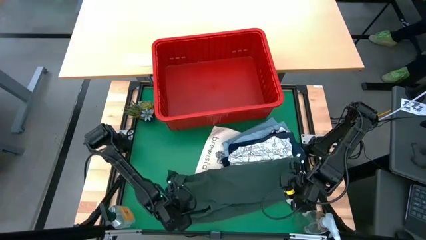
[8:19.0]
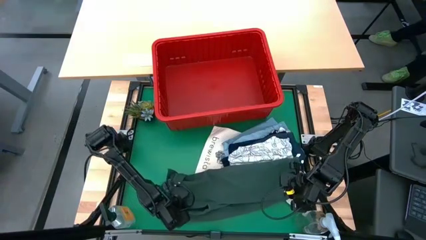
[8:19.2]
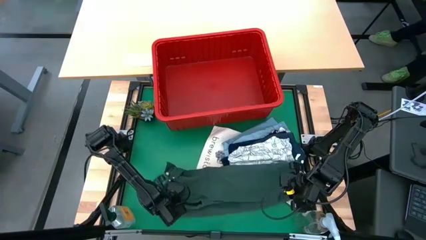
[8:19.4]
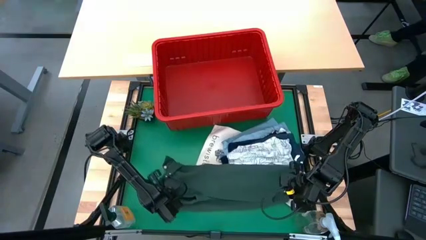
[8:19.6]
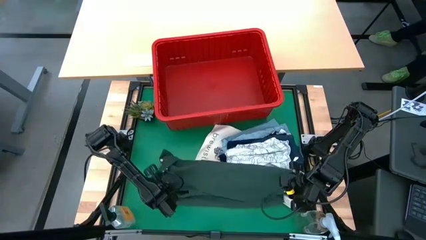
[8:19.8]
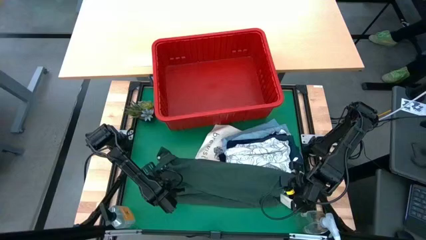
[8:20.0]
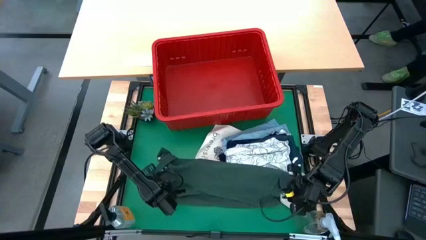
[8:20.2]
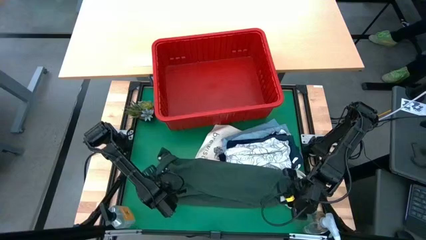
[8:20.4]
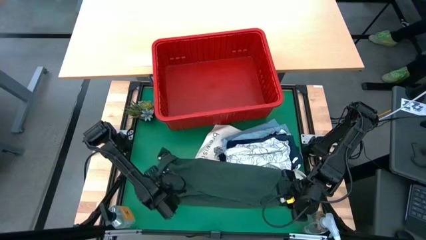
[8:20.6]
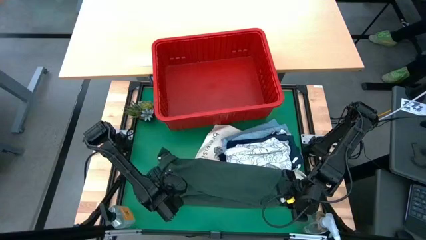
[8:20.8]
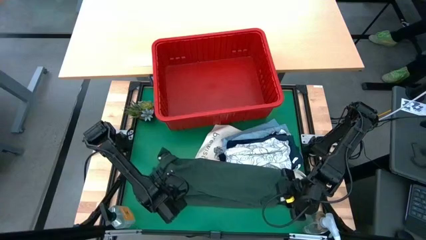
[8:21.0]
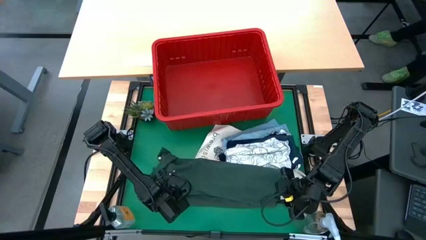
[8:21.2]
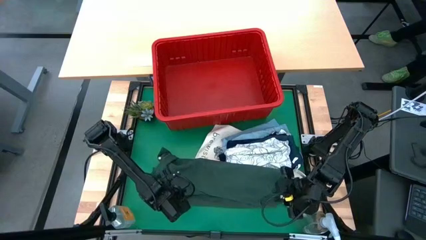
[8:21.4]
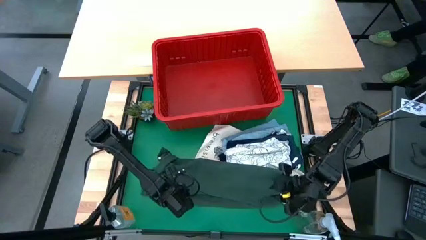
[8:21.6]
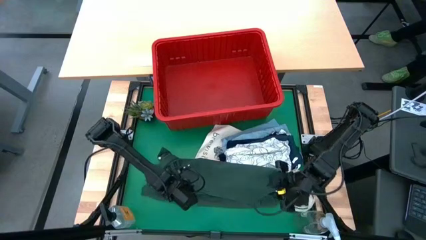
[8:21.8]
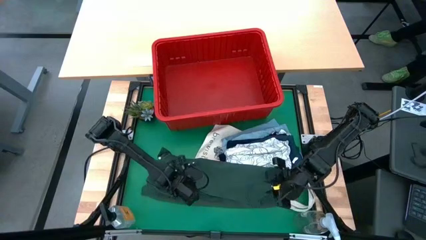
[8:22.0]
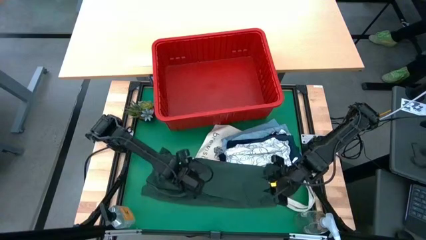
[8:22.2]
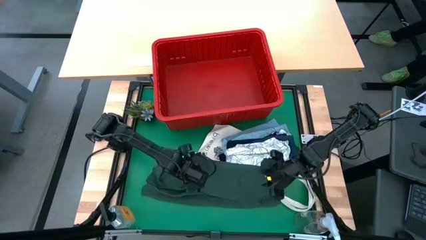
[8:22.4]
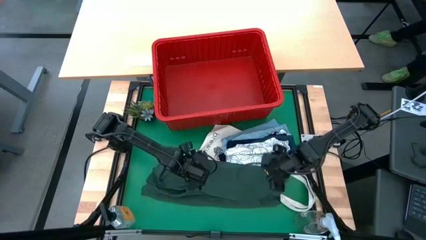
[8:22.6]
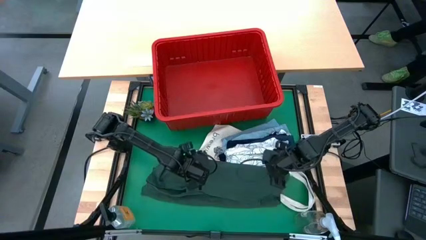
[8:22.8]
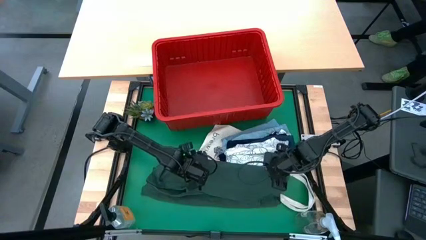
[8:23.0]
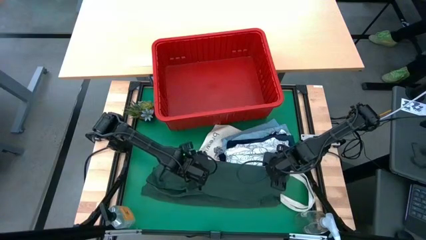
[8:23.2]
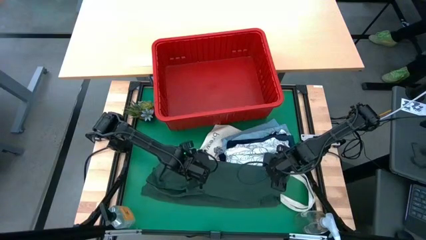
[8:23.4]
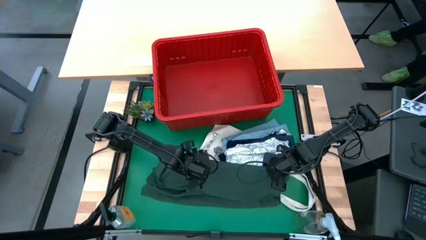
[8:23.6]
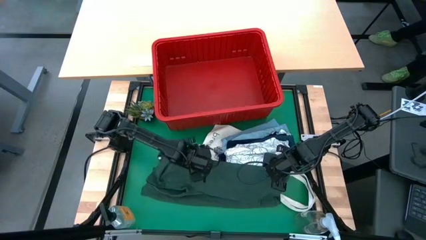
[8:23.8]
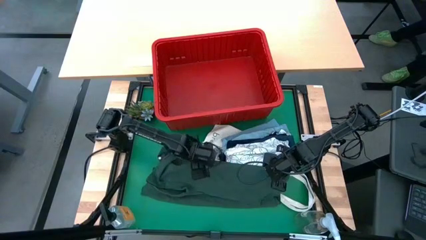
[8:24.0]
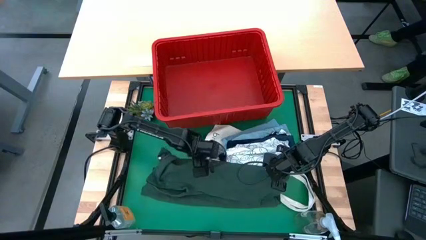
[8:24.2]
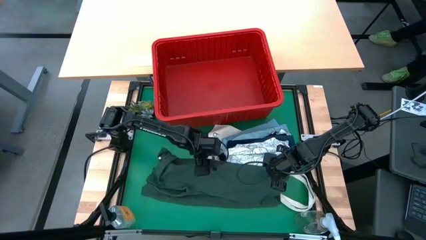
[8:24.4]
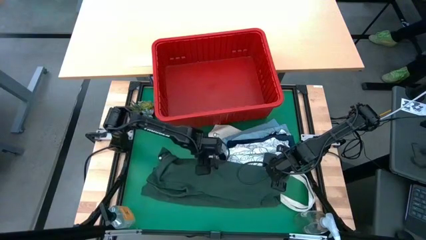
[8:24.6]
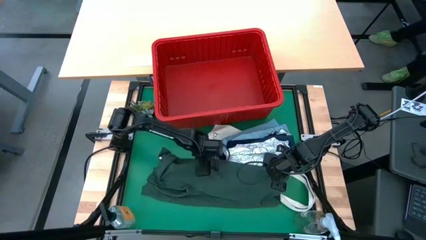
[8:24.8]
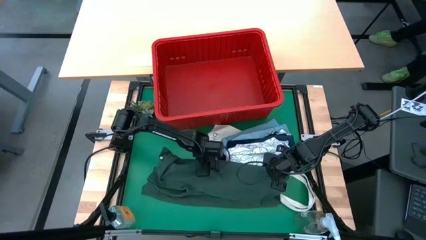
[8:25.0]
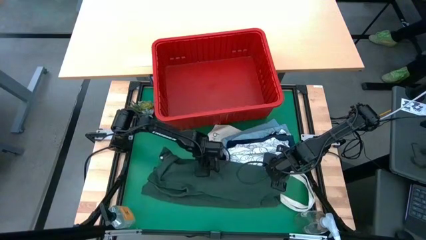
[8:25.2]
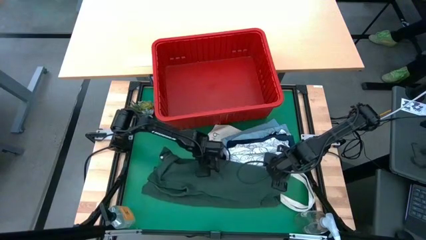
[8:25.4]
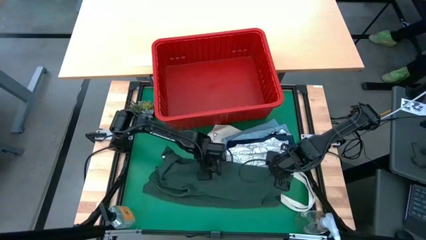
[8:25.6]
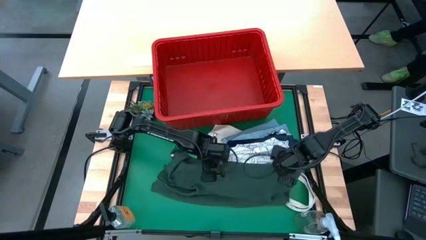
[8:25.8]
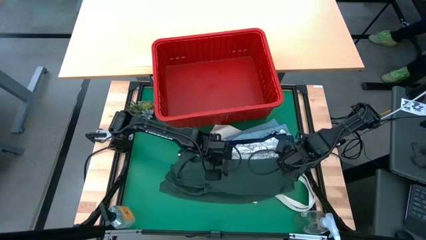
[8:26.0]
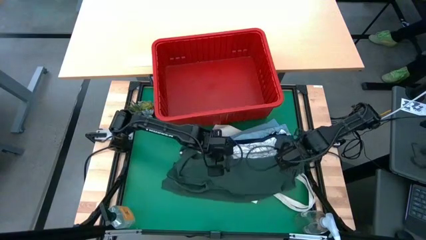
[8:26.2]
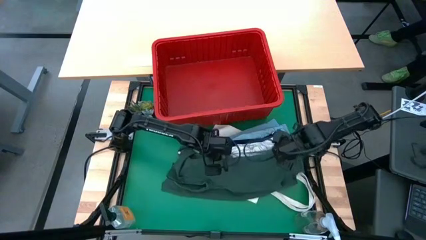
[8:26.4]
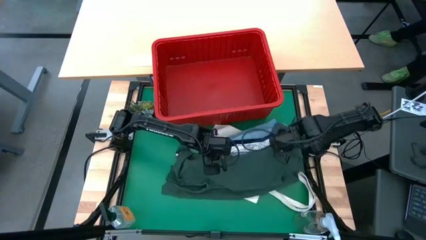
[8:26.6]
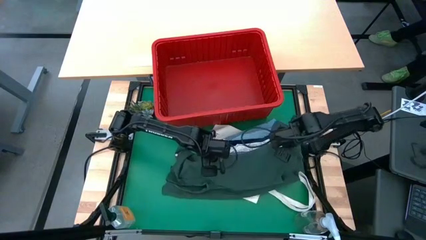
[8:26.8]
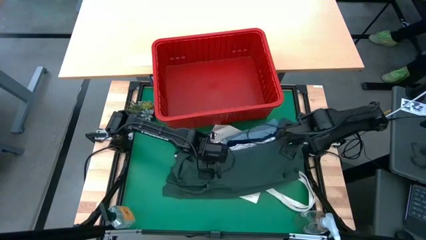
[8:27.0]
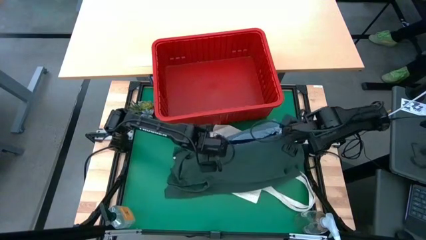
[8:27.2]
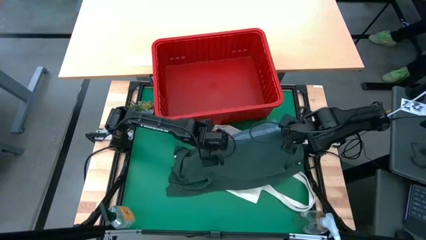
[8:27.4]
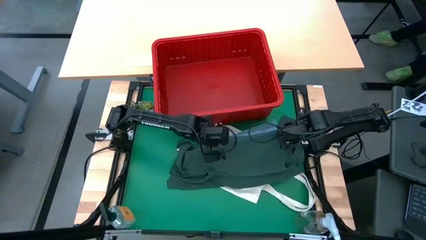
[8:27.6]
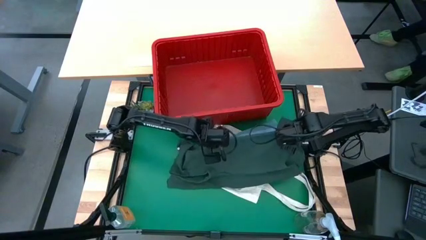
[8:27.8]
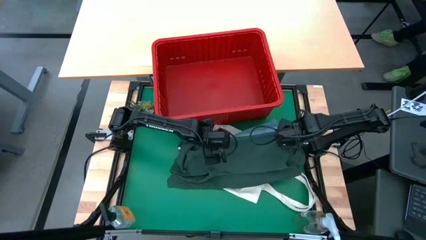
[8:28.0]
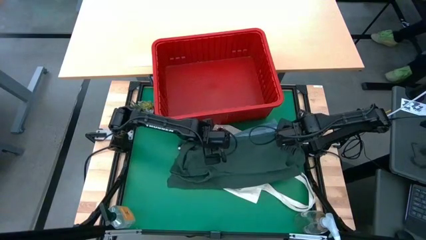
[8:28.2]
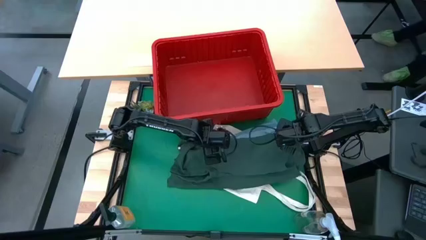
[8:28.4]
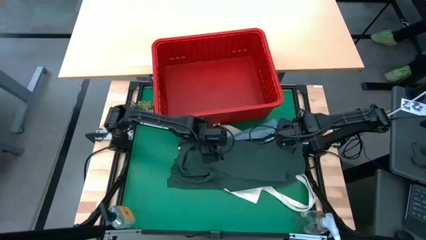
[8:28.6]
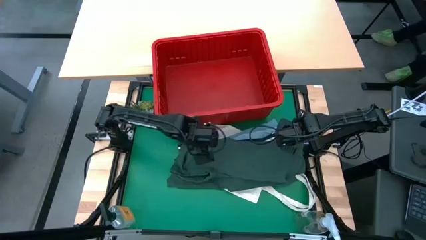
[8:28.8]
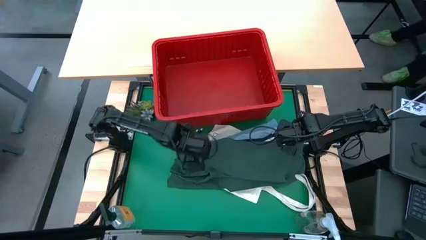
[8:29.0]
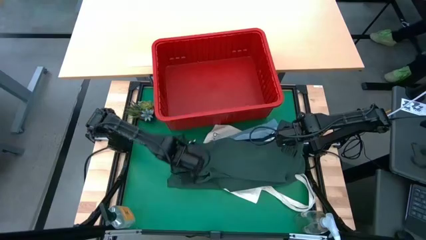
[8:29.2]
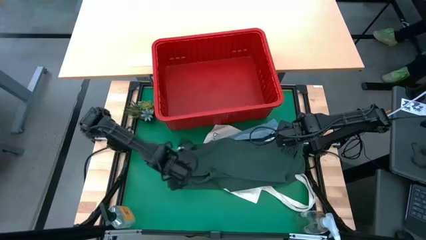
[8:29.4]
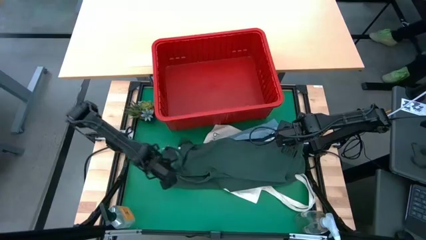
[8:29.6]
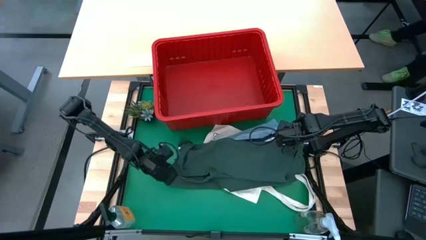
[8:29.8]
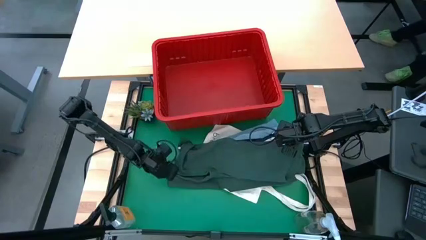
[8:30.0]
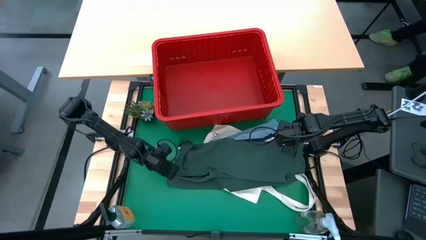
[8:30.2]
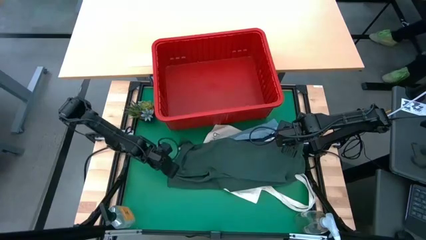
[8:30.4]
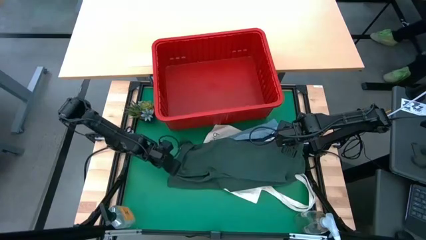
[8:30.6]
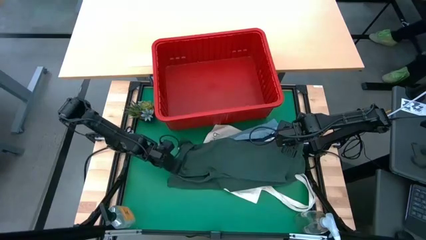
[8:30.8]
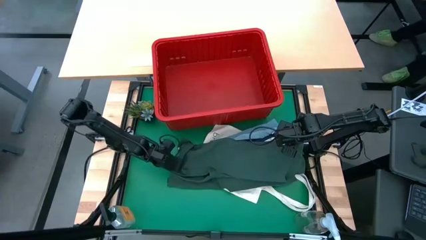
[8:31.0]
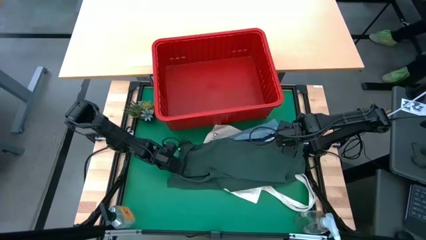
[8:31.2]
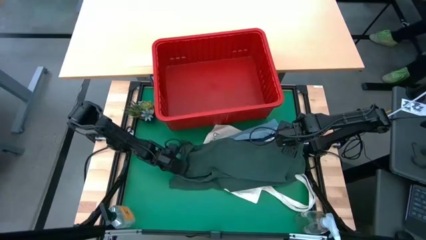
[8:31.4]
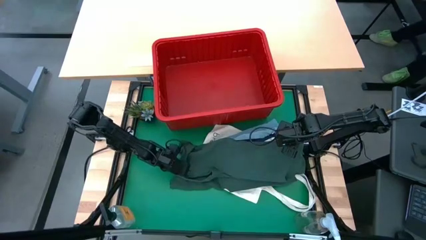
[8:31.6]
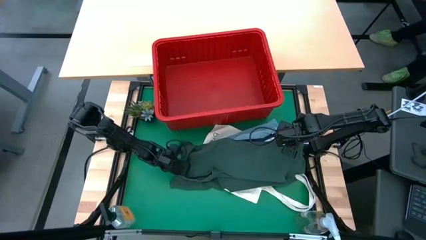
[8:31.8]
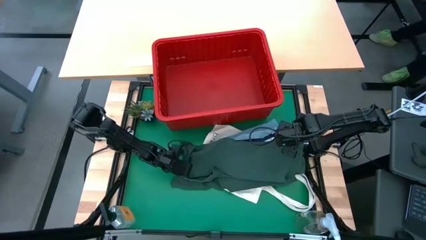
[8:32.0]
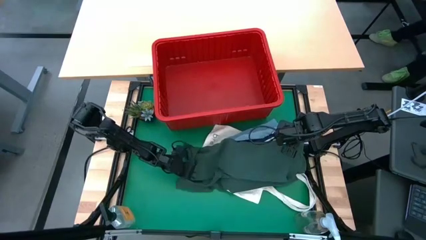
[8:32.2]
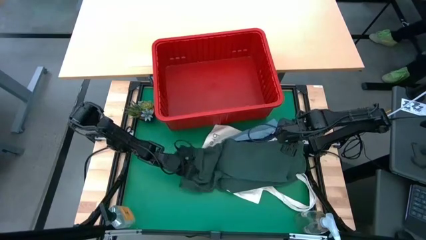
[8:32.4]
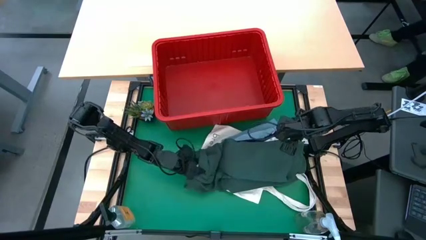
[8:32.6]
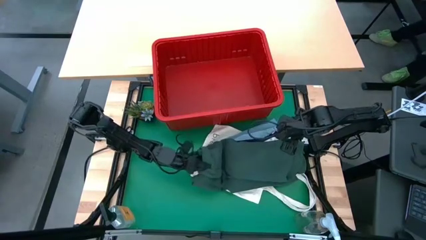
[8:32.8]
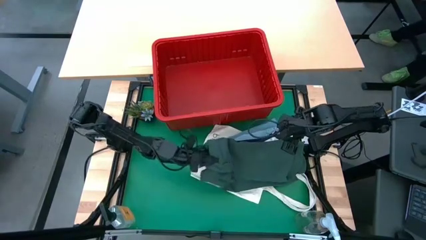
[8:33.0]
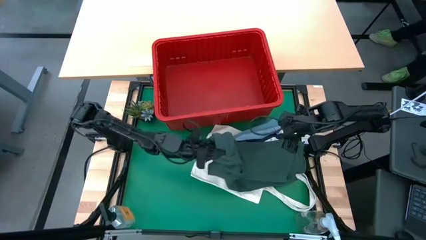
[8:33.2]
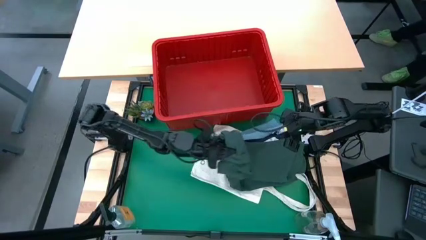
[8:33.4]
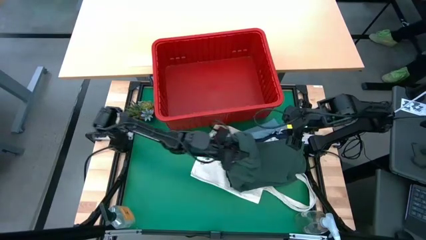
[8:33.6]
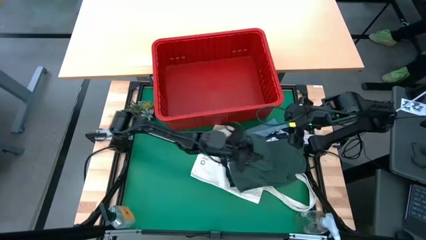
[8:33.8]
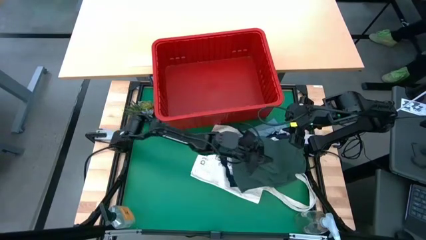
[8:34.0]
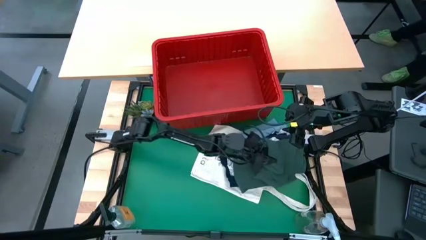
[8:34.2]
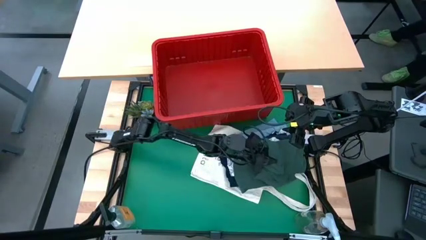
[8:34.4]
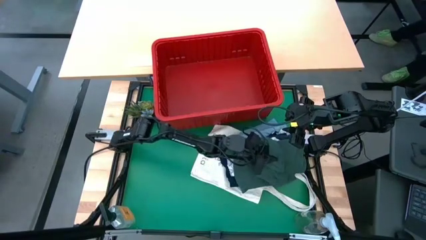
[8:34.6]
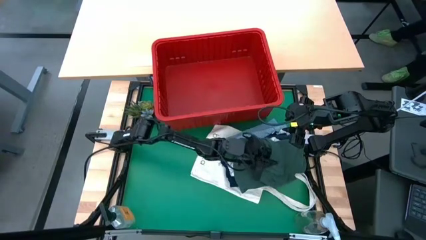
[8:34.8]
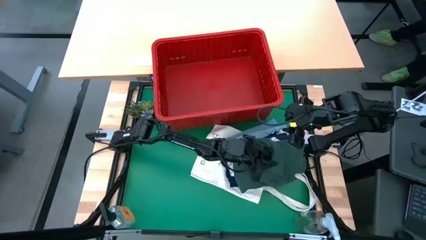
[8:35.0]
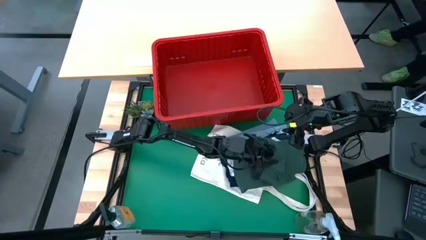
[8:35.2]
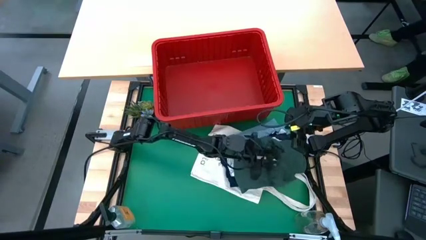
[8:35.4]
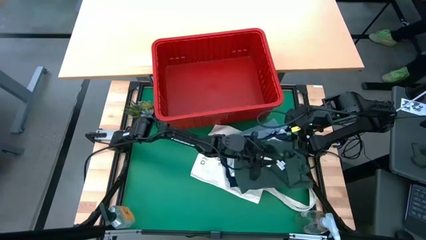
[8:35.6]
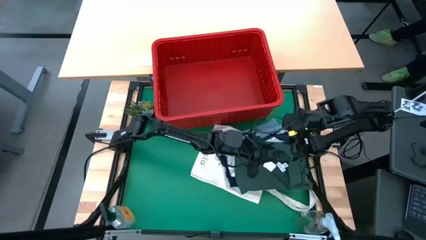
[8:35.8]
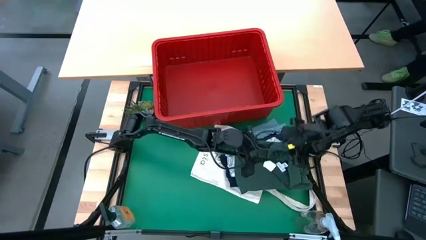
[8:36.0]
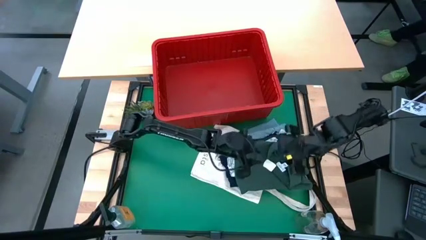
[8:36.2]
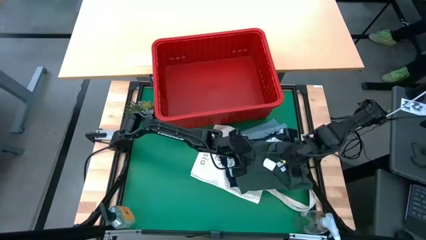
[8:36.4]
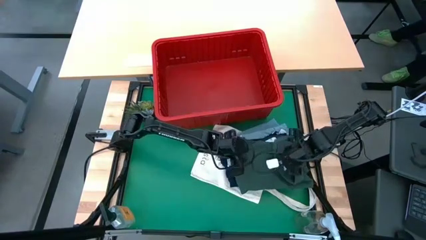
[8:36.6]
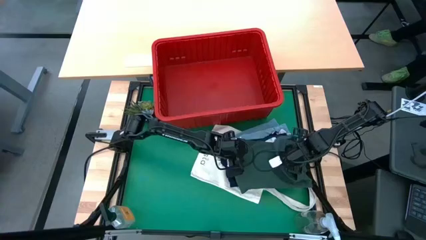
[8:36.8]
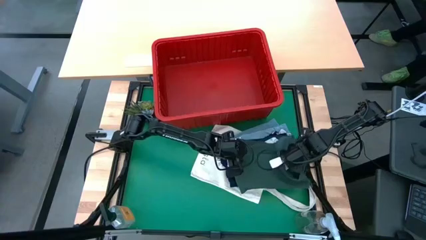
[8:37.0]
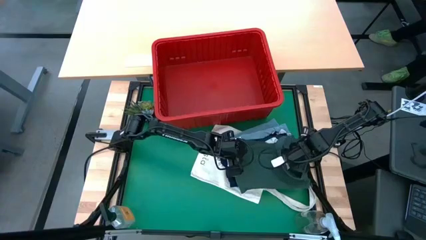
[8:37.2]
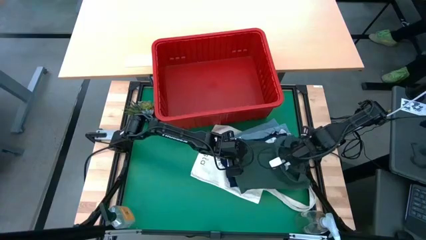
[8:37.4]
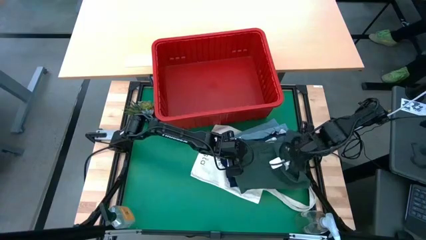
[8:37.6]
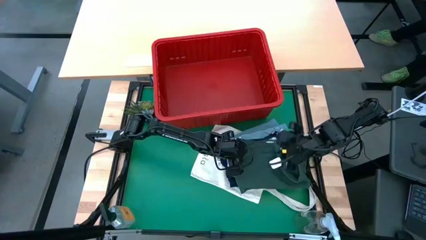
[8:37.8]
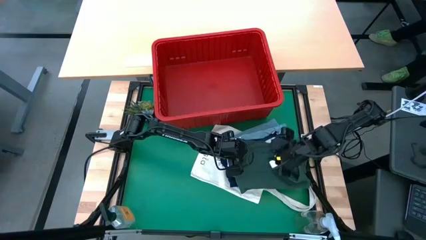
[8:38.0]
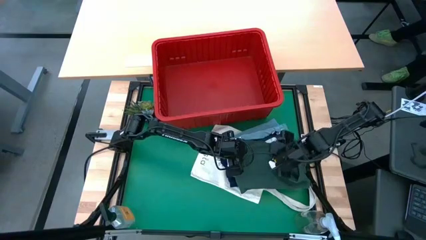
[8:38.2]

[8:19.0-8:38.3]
Task: Fold laundry
Fold the green shirt
